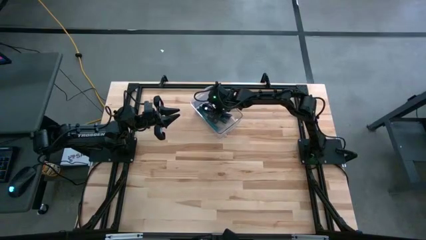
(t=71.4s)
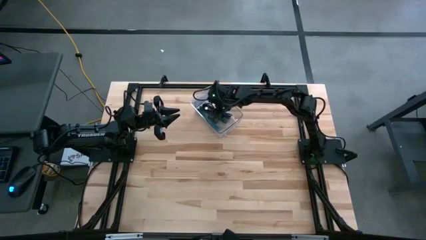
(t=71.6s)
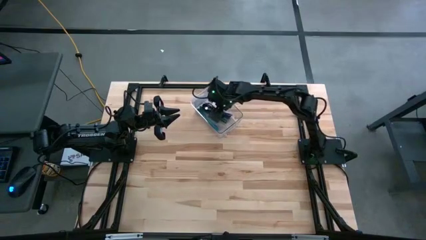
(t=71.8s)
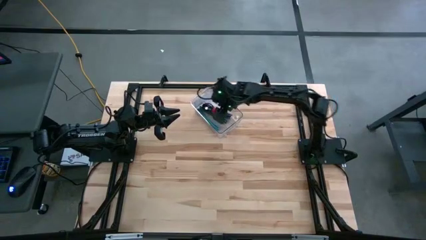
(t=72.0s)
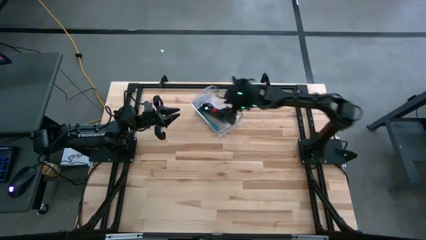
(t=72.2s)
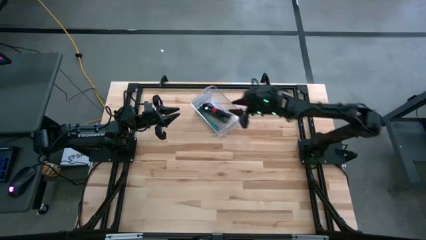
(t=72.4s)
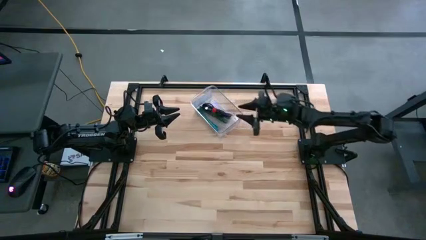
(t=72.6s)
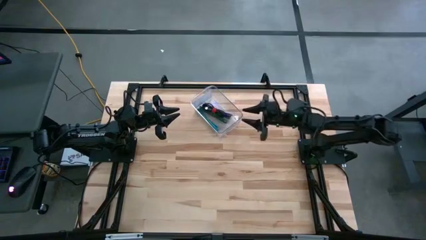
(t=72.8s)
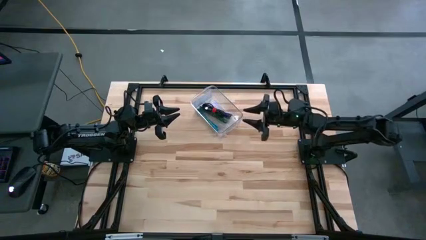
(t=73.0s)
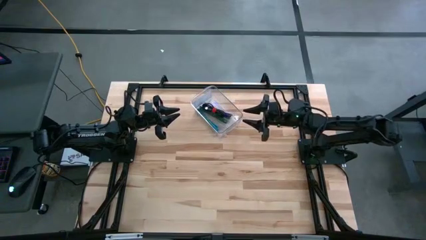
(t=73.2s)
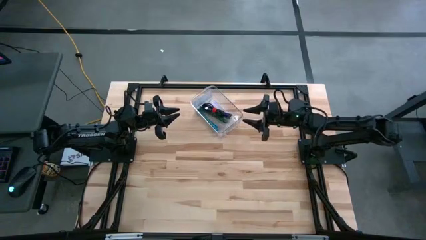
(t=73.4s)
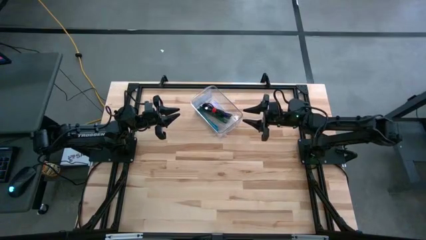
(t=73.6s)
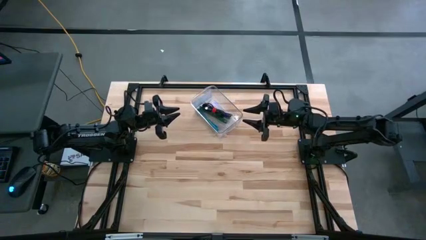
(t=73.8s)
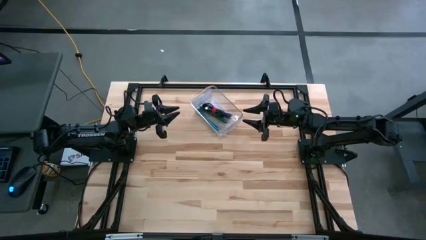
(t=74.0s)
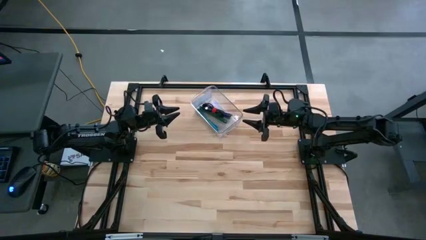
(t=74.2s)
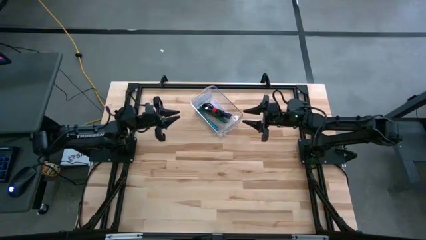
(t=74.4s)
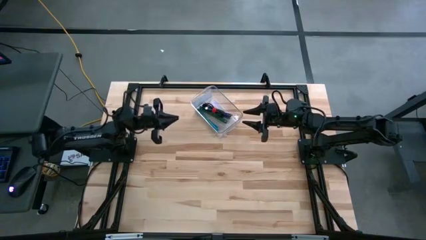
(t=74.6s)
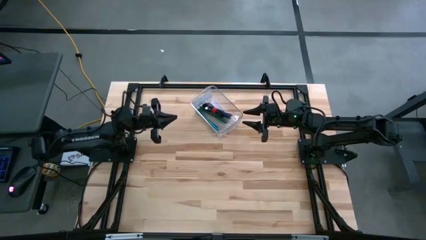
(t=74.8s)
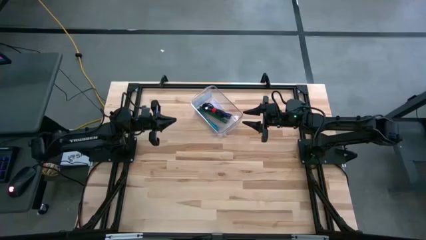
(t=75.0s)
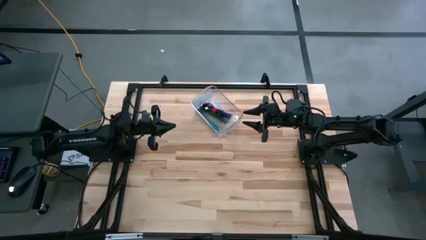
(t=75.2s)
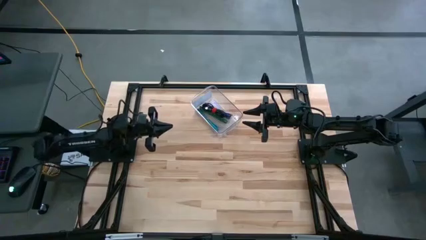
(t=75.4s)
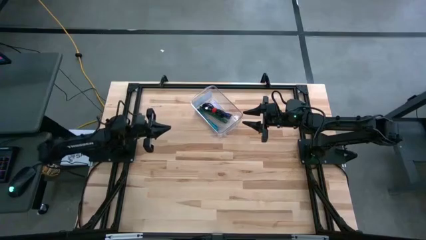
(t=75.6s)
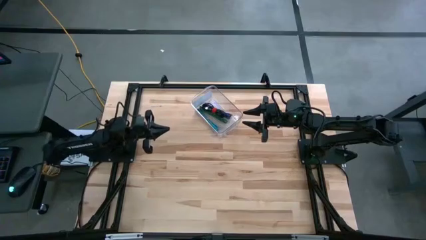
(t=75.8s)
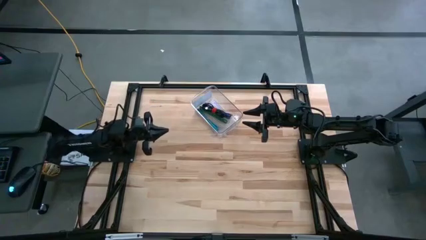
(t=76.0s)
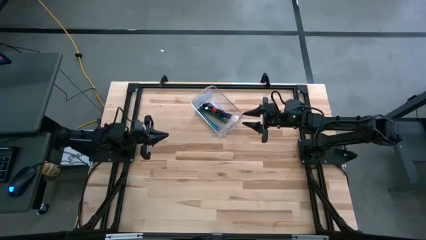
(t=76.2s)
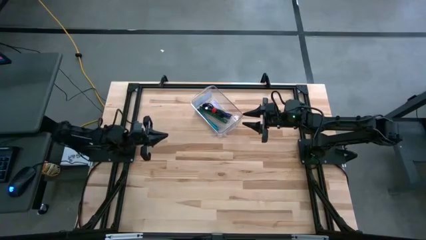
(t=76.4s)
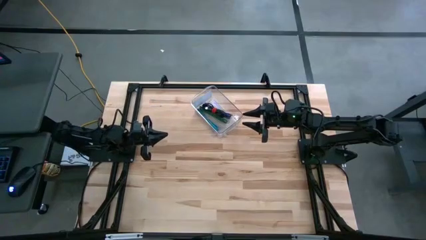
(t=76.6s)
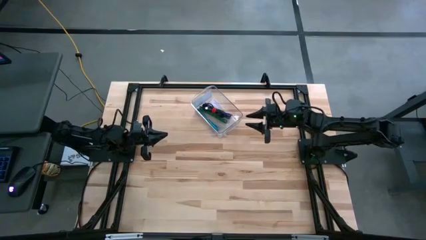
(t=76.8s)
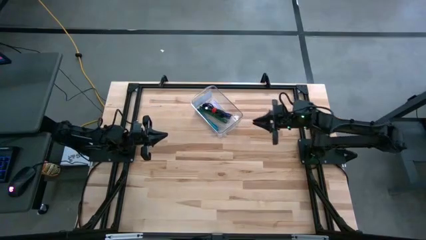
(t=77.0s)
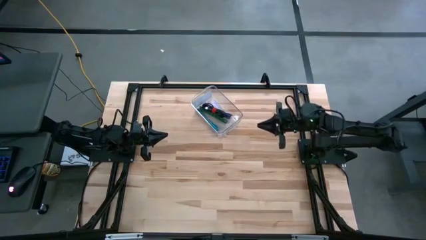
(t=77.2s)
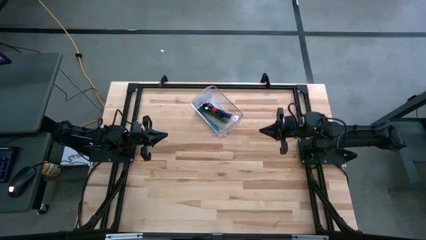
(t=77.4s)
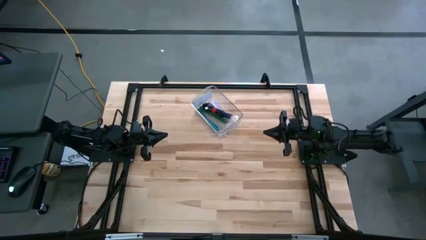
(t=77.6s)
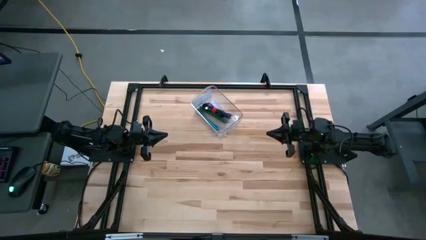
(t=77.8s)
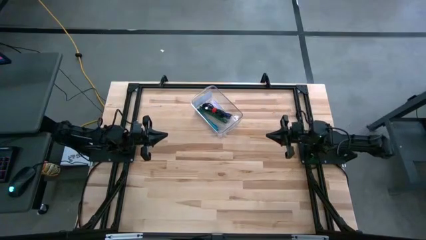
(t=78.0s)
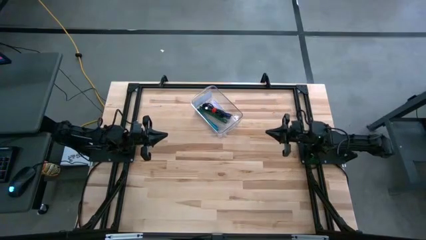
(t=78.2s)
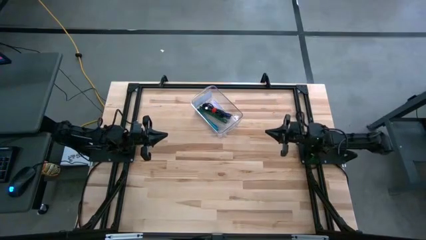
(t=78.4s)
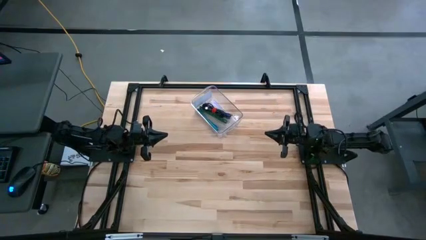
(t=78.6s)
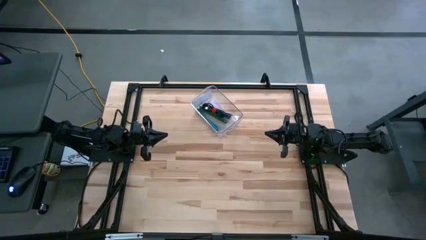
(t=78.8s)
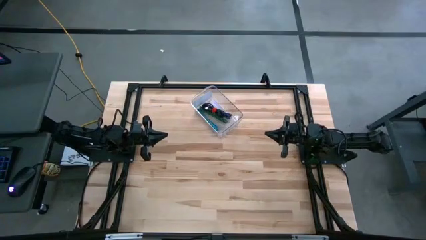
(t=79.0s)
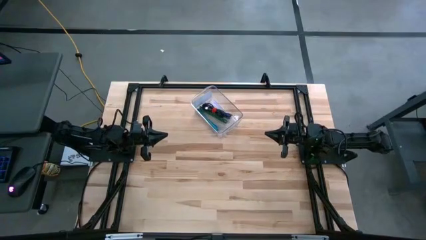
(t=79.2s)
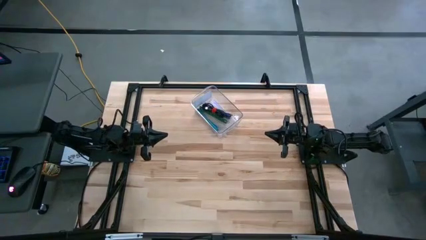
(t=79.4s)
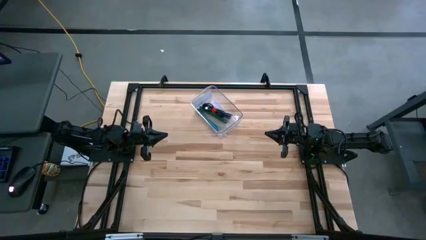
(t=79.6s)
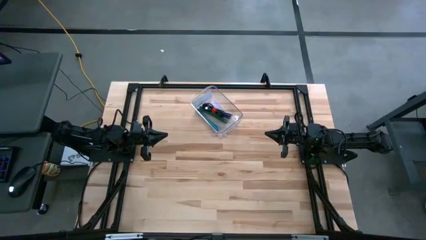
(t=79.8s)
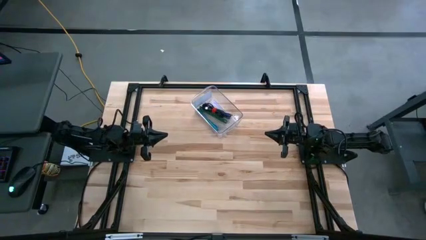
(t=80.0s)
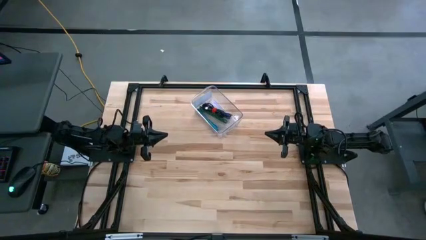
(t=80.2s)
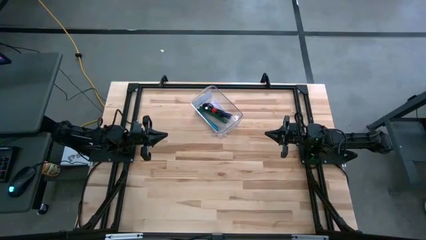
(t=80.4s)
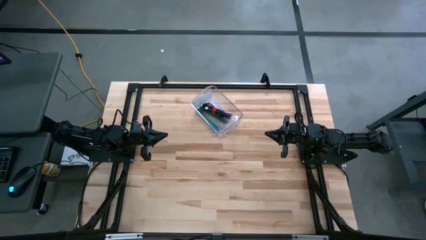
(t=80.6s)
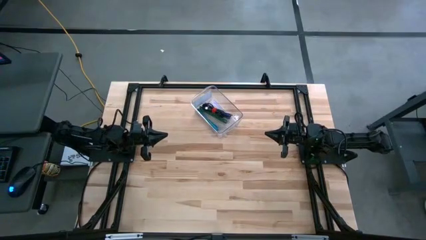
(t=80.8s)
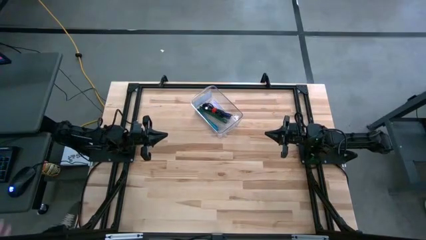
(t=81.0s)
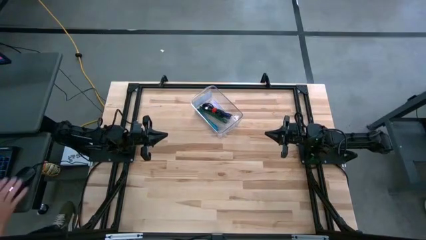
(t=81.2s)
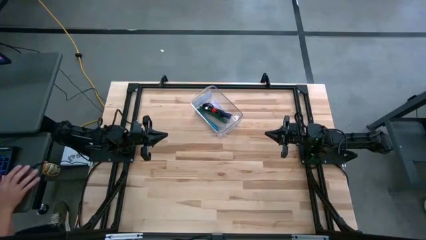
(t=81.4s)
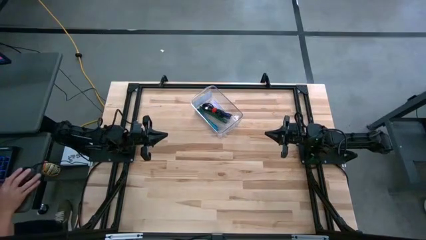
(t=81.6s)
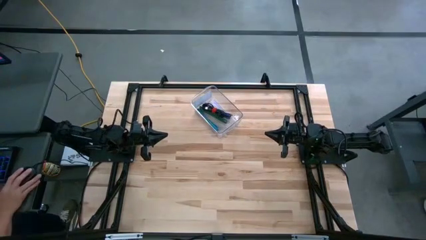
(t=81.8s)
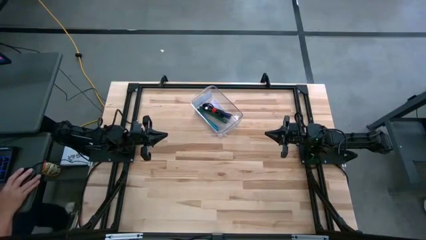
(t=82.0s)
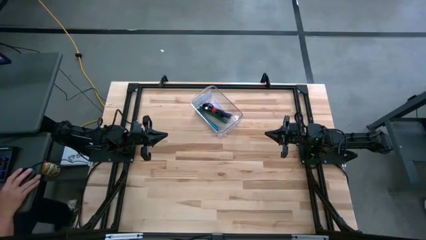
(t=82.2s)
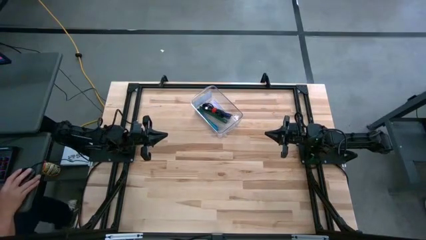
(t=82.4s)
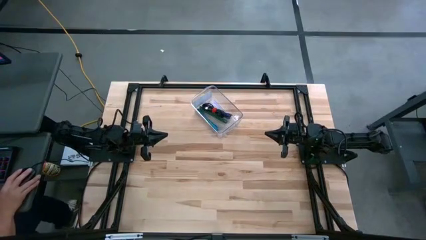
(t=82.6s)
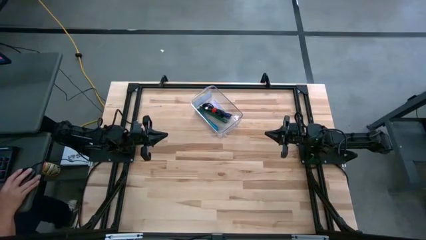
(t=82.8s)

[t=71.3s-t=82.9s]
Task: Pick and place USB-C Cables
Return to Home Position

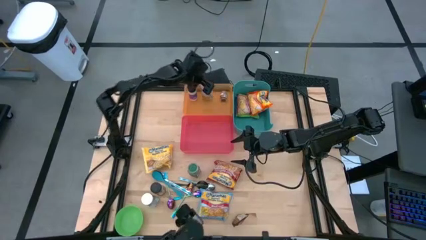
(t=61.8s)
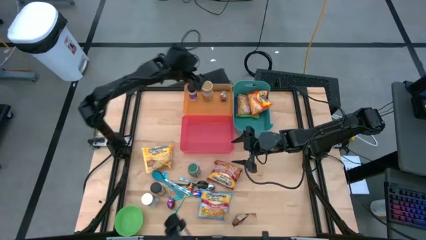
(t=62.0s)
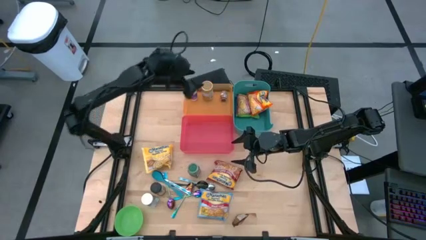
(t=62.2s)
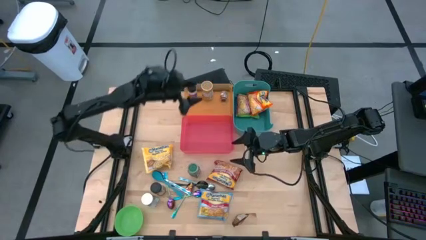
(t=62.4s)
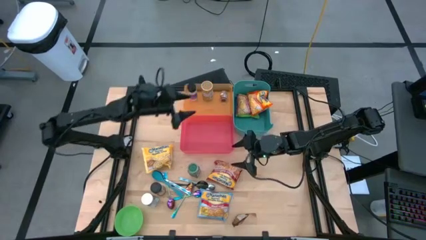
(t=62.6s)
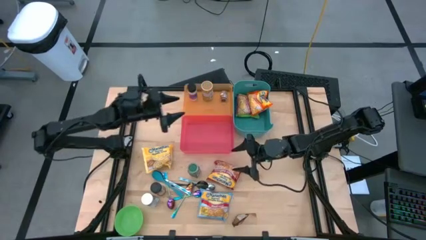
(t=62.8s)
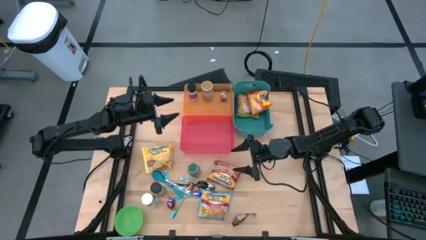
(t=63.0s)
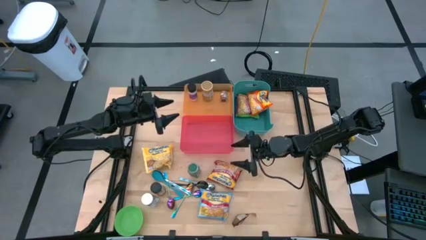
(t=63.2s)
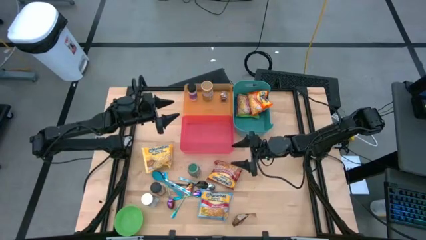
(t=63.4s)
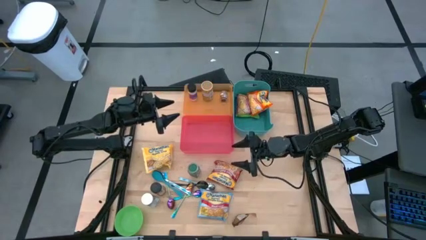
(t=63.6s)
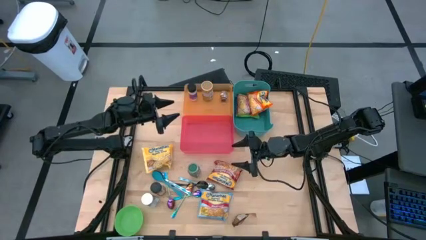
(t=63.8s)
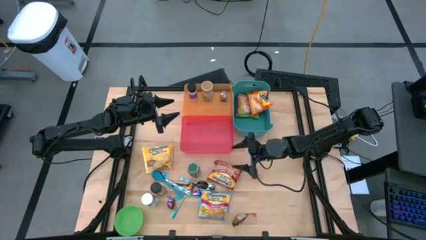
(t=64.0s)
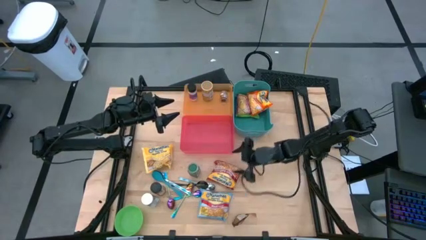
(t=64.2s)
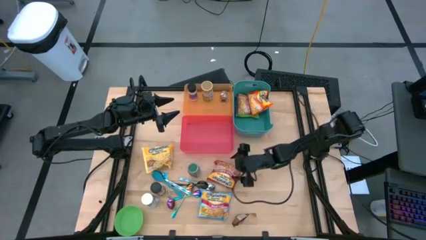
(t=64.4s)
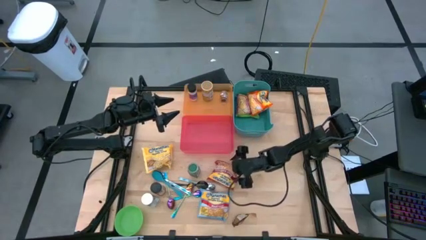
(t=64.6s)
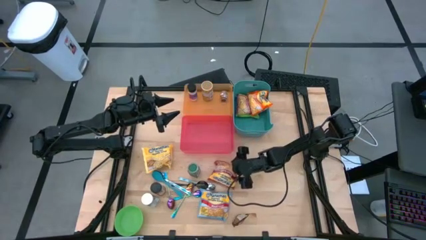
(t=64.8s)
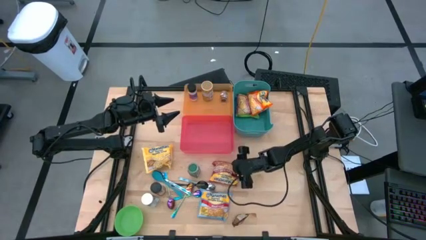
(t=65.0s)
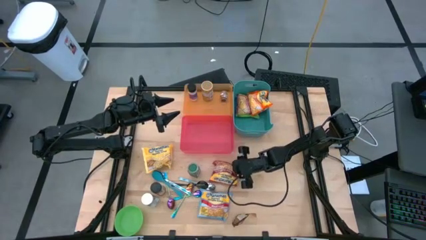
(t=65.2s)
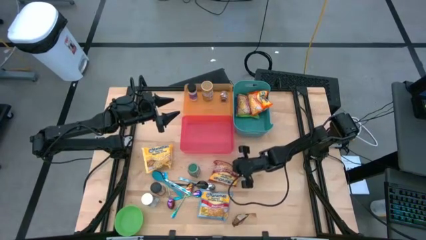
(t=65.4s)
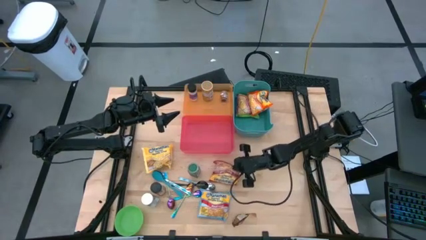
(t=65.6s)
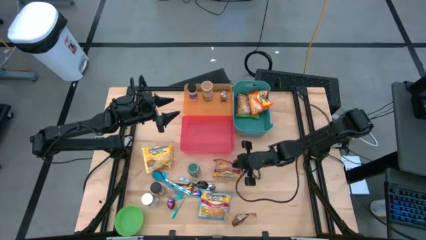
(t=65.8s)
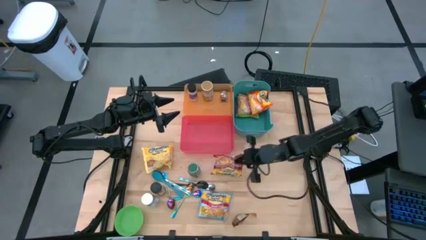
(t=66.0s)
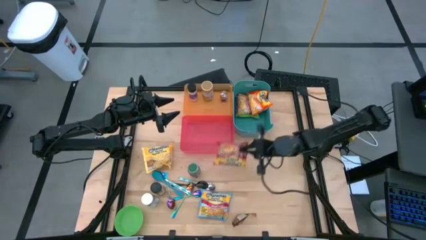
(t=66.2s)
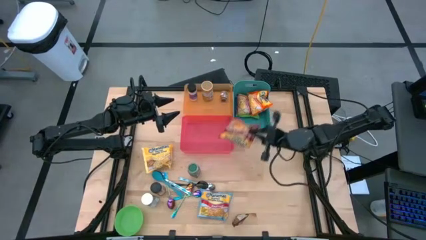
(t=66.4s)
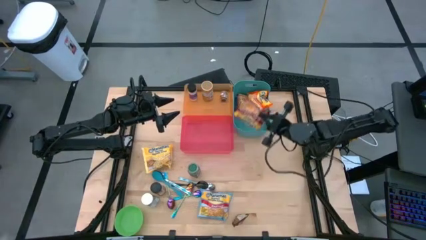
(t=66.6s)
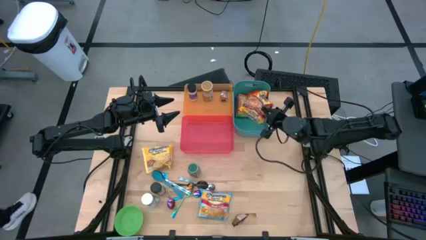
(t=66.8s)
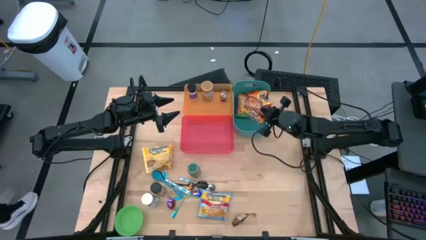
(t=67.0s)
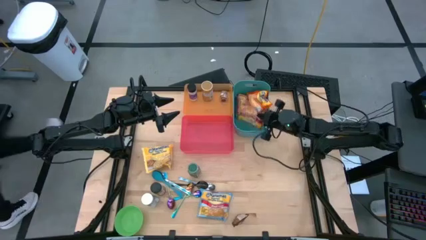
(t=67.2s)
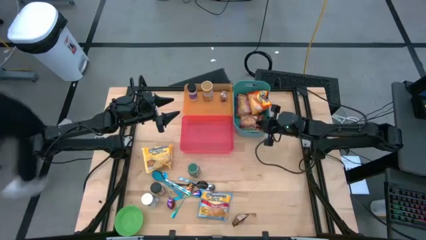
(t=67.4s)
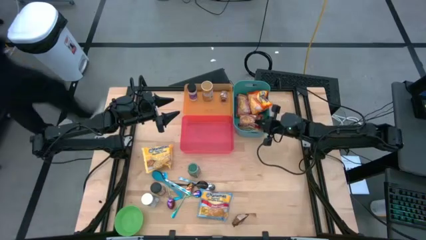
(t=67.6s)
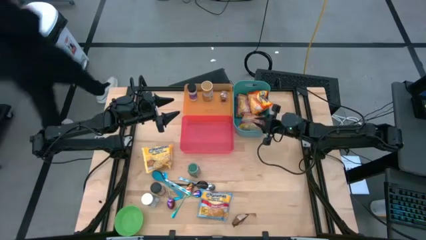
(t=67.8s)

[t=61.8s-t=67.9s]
Task: Pick & Place Food Item
Put the red noodle pack into the blue bin
